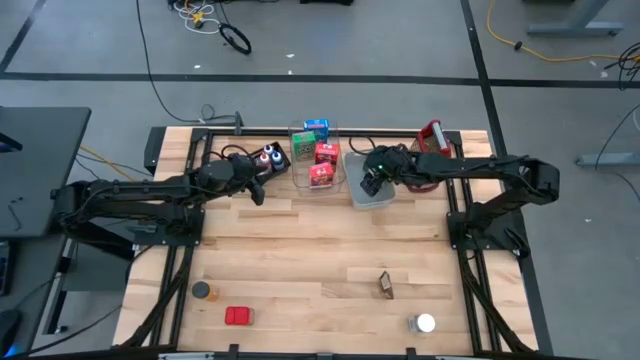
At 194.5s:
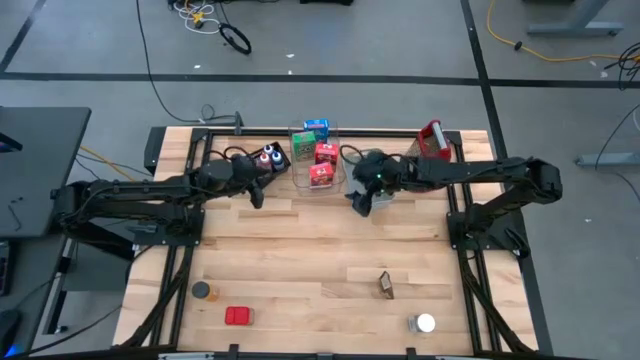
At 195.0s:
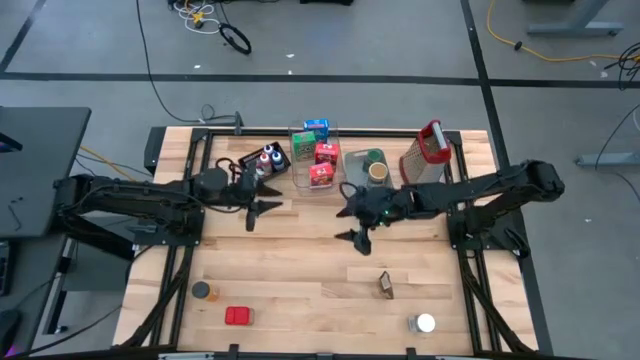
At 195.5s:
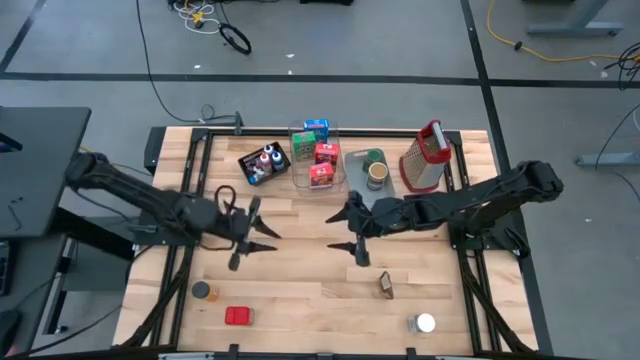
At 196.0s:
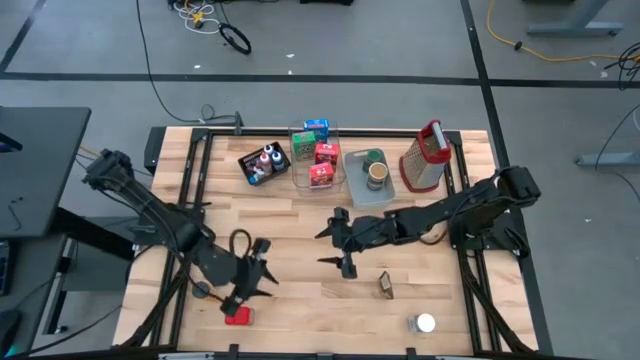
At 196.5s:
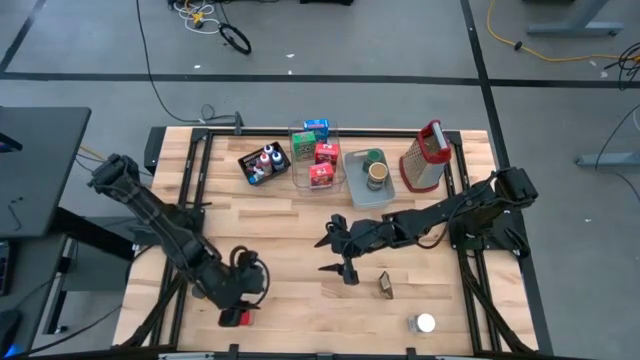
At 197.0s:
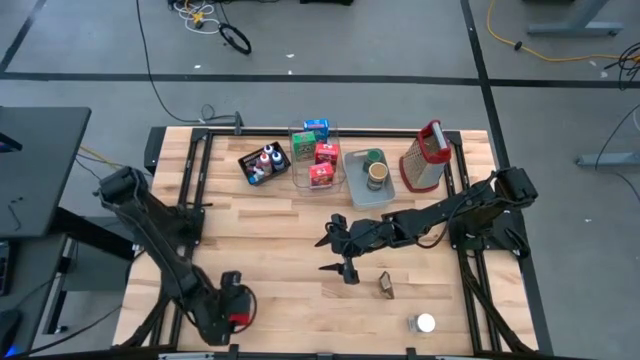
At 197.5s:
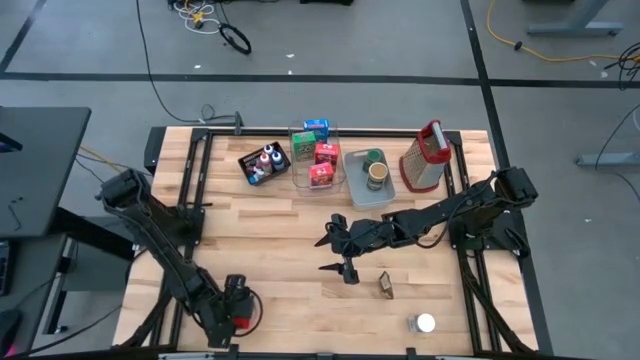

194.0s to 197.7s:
Task: Pick & Place Kitchen Items
Put the red spice can into the gray bin

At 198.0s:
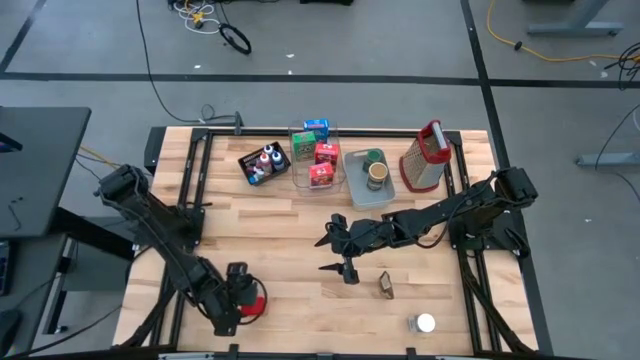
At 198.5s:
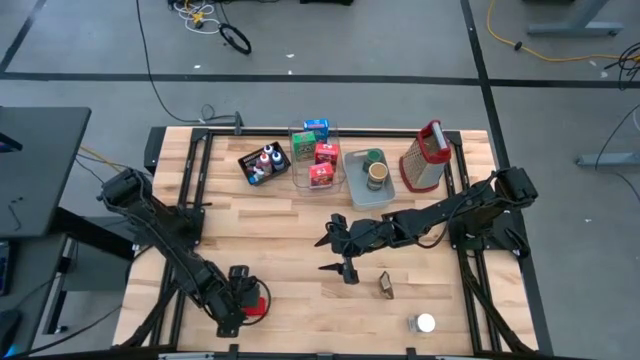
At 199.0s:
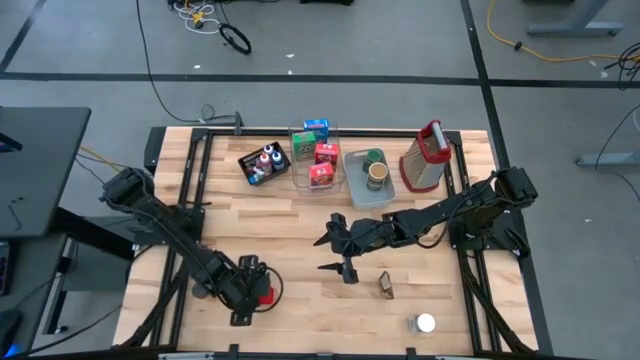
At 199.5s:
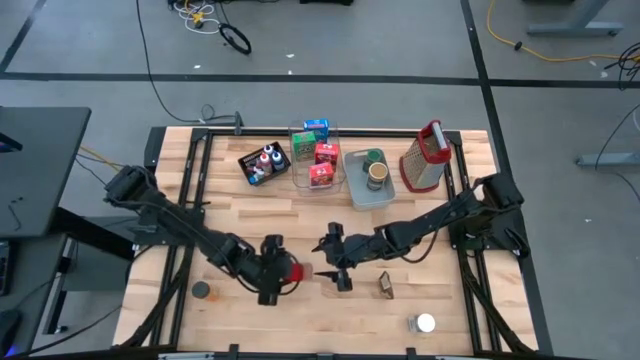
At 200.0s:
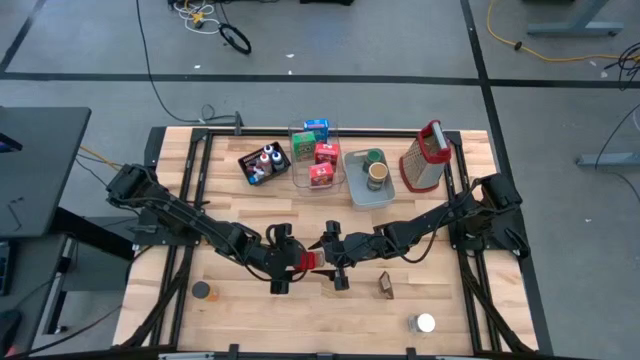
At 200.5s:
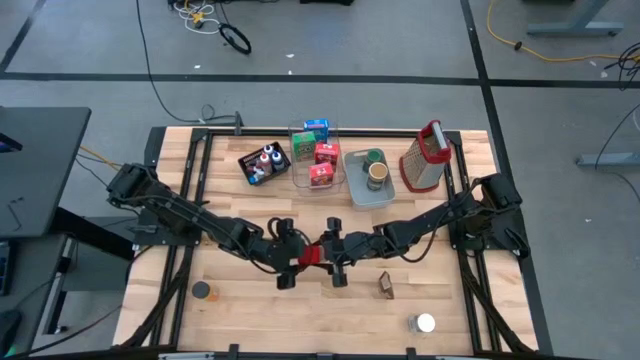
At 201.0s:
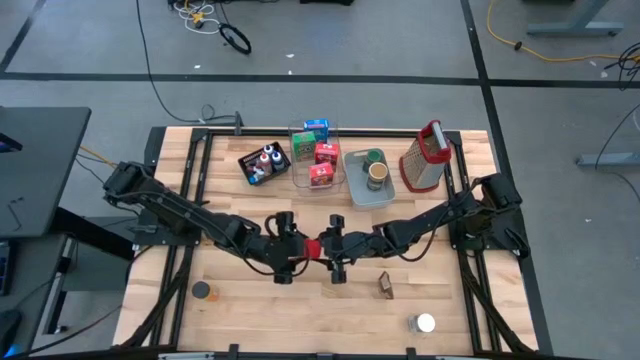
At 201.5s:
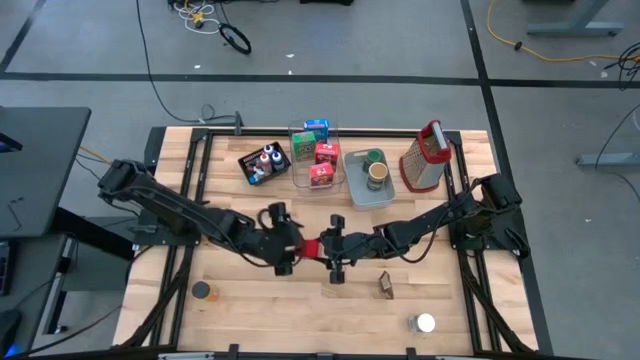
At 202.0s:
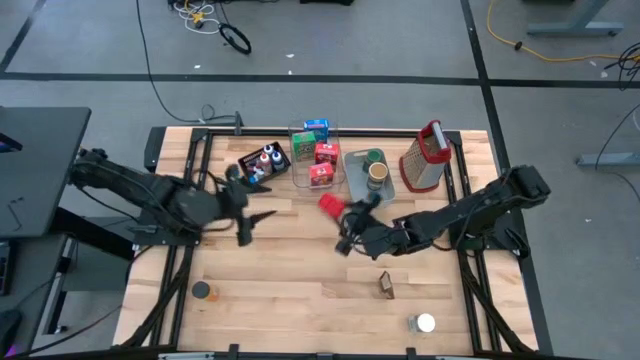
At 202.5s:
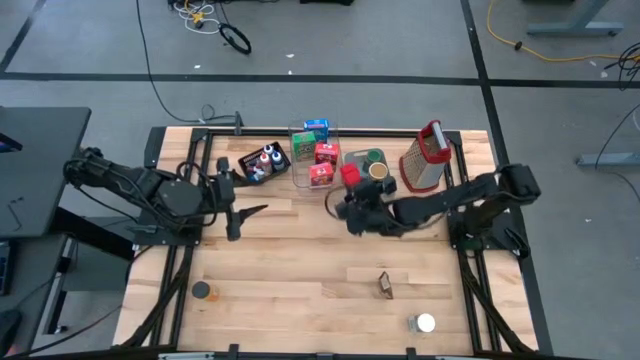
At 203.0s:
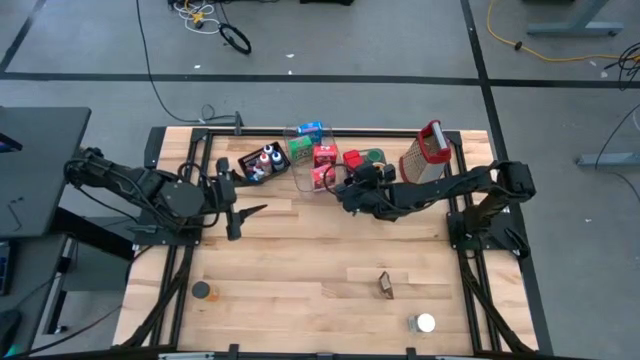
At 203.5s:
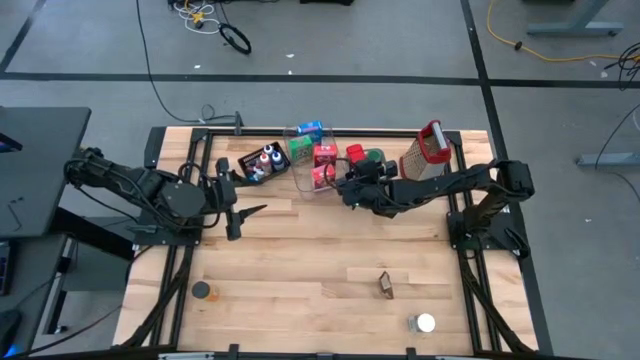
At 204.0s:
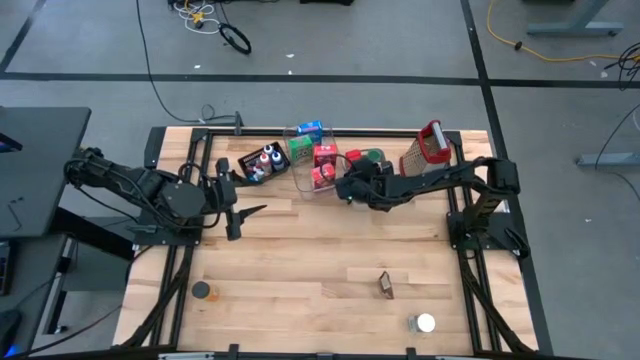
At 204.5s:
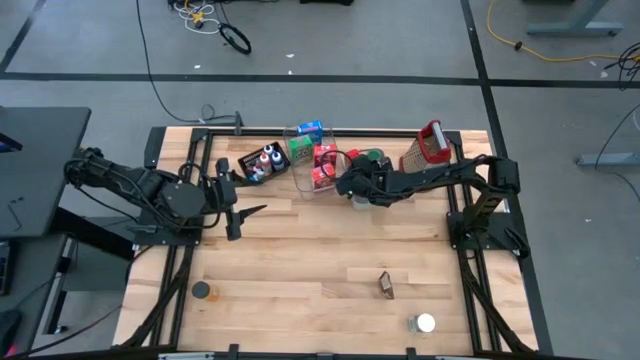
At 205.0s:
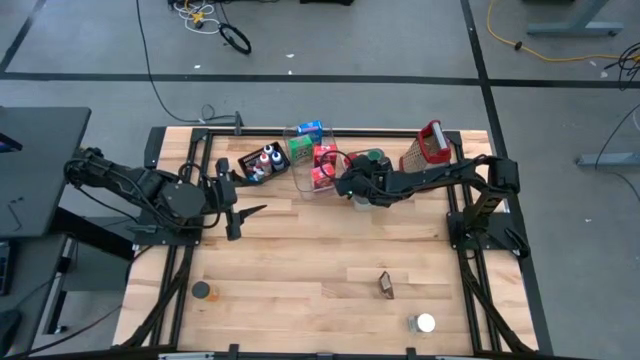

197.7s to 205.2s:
Put the red spice can into the gray bin

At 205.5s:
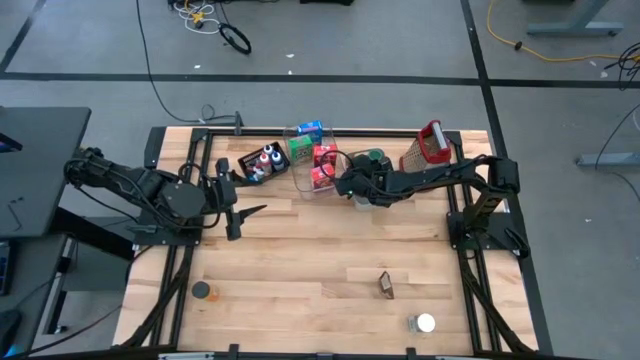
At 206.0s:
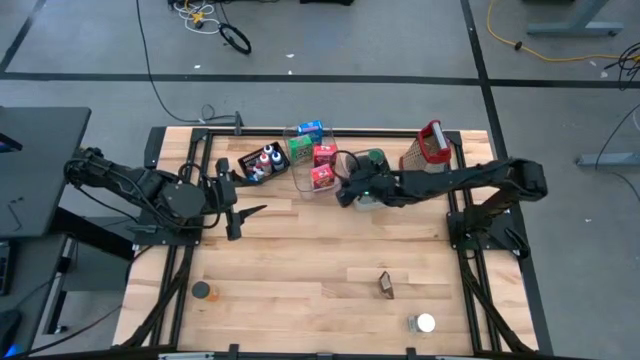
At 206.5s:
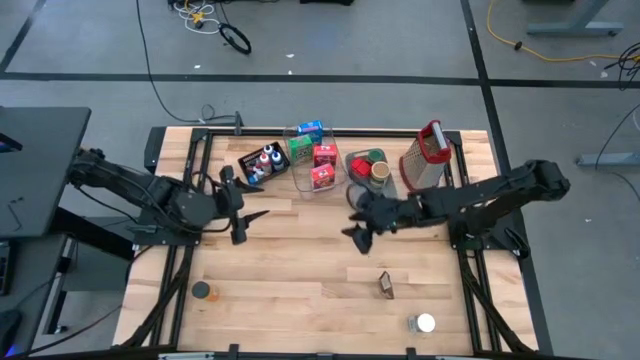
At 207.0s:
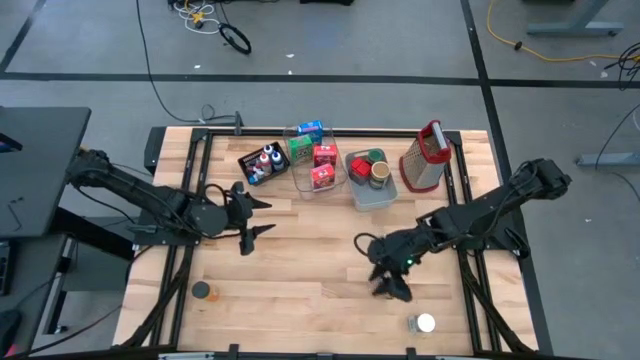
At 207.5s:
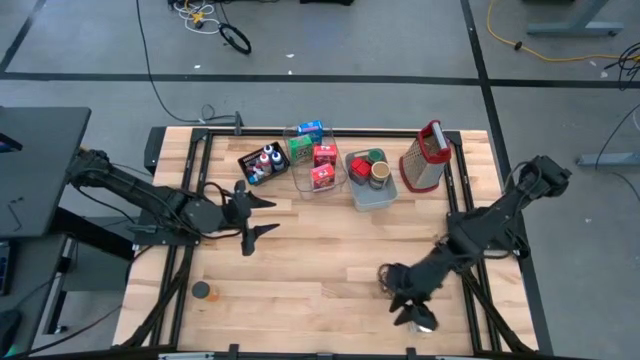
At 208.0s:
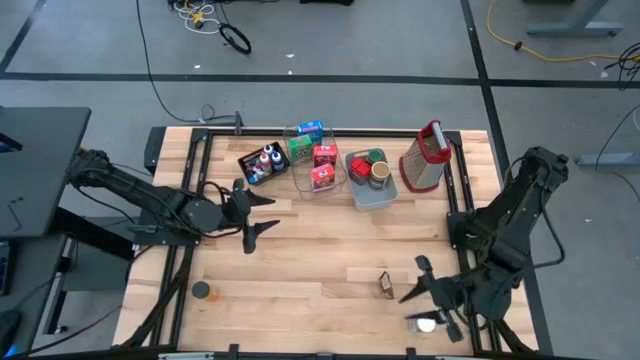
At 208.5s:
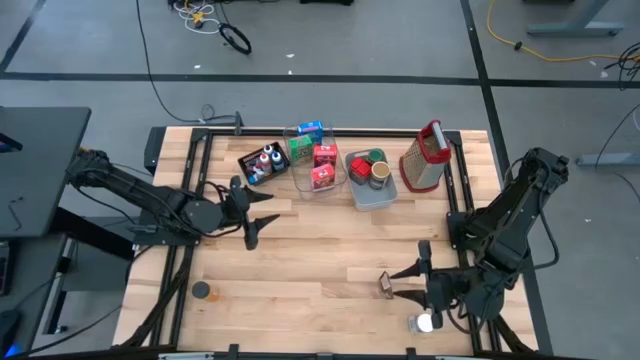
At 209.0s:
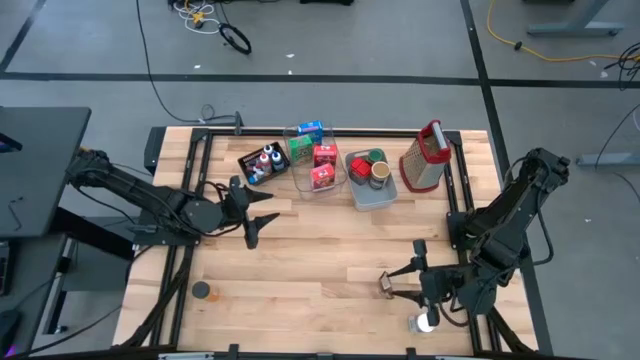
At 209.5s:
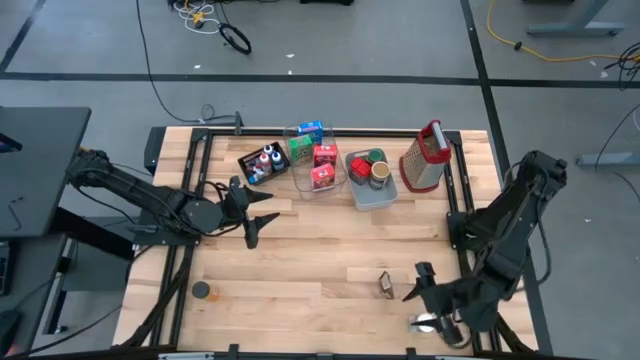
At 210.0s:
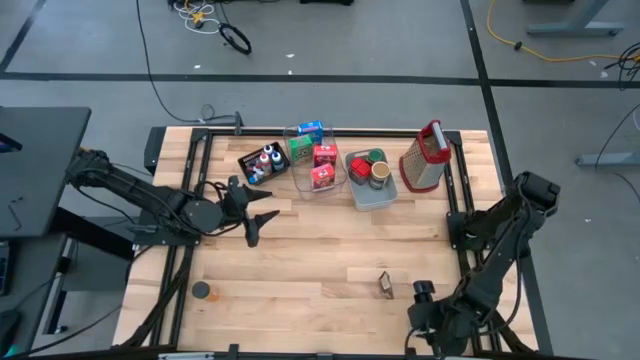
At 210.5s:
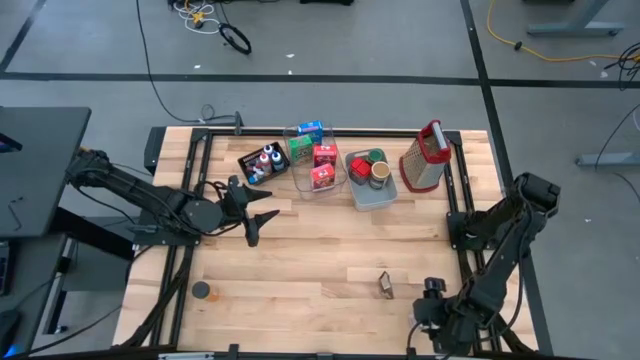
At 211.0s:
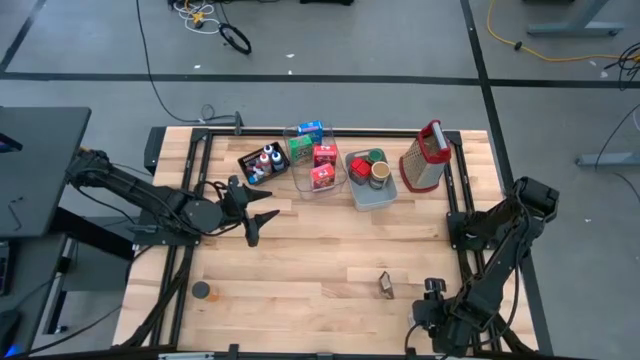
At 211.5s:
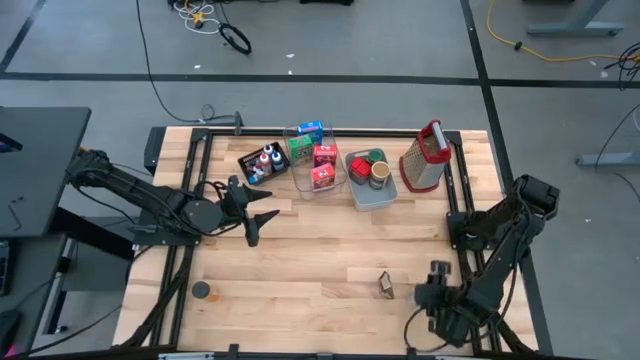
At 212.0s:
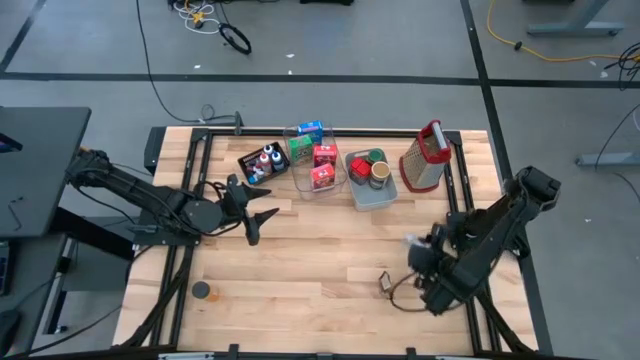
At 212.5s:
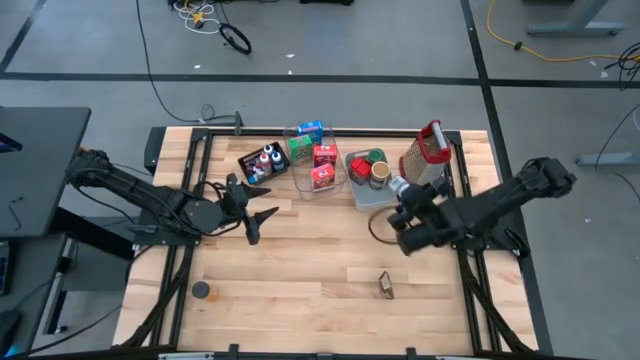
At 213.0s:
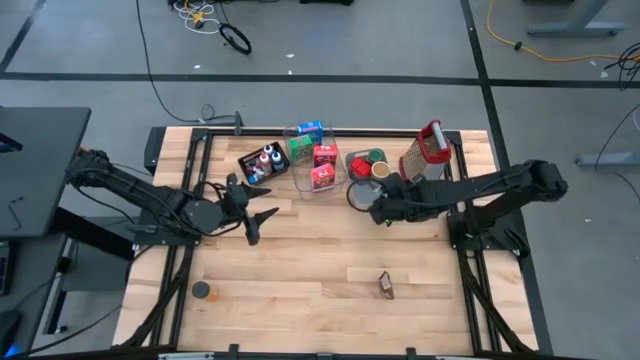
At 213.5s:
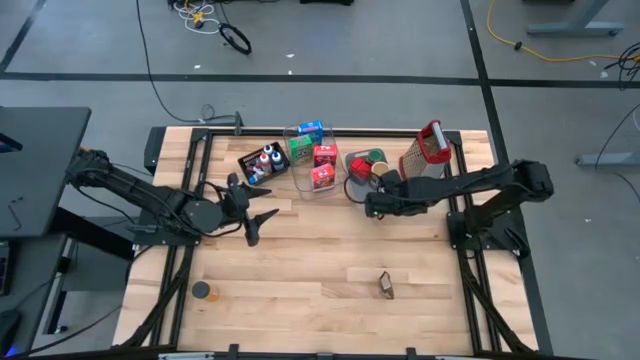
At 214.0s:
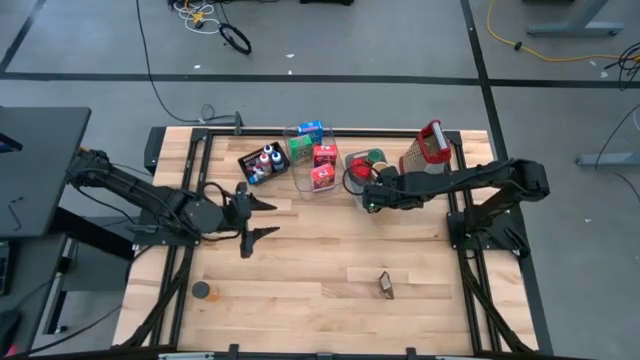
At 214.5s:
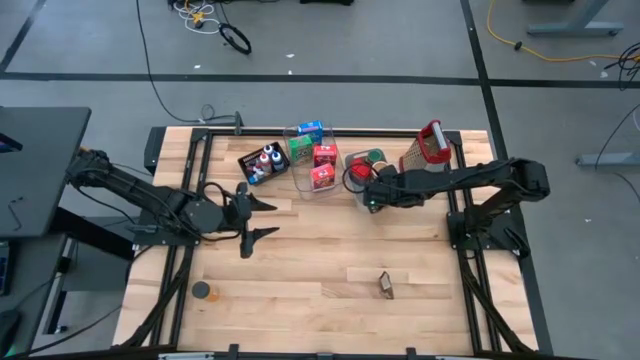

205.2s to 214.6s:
Put the white spice bottle into the gray bin
